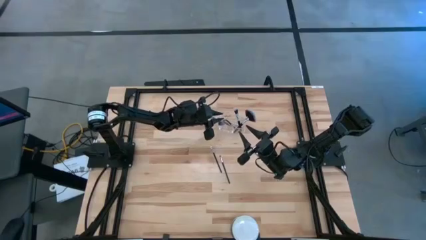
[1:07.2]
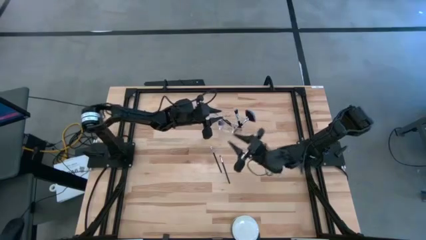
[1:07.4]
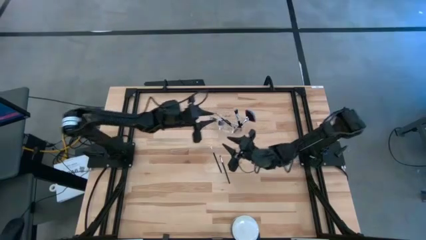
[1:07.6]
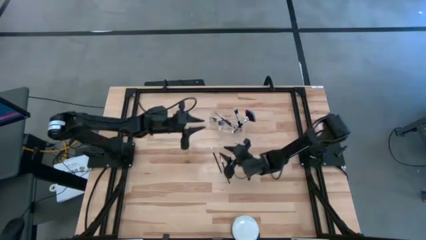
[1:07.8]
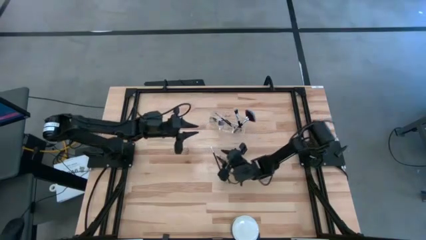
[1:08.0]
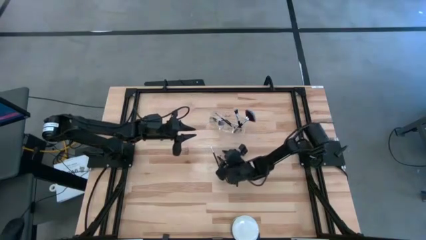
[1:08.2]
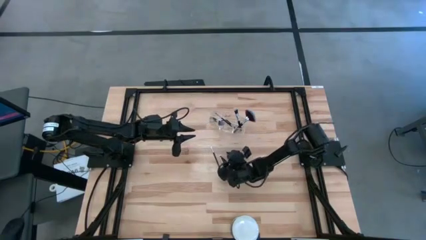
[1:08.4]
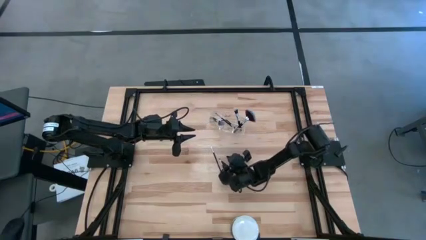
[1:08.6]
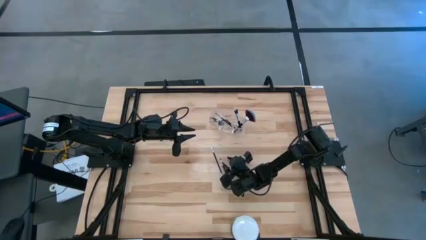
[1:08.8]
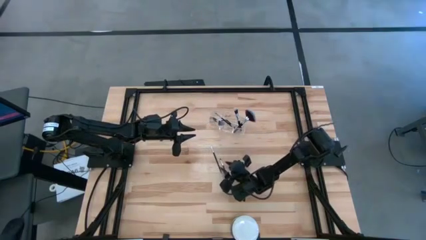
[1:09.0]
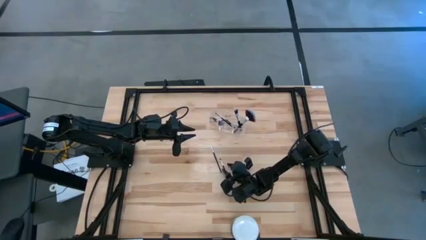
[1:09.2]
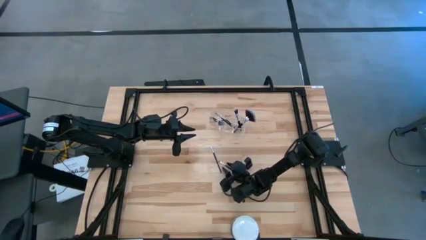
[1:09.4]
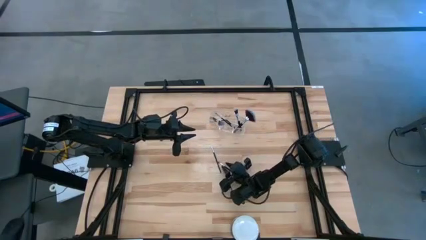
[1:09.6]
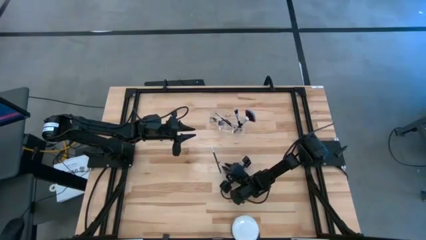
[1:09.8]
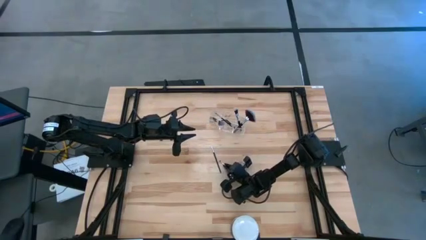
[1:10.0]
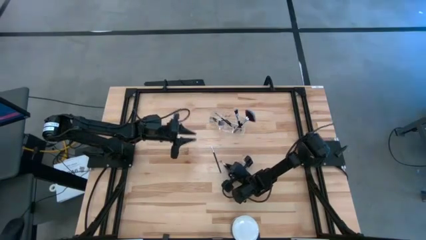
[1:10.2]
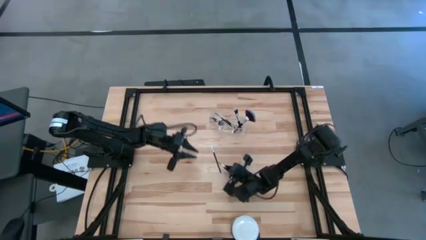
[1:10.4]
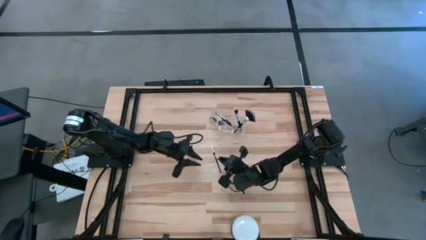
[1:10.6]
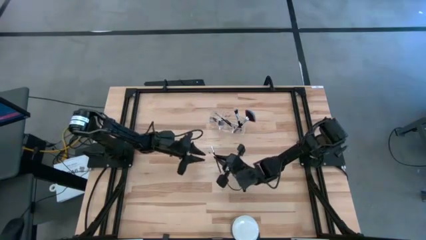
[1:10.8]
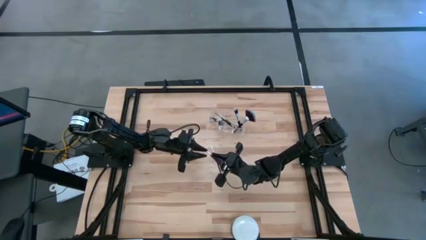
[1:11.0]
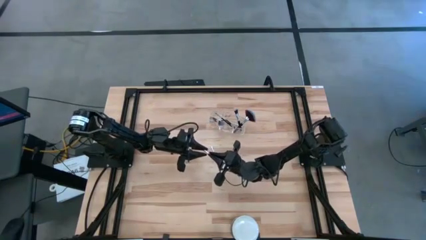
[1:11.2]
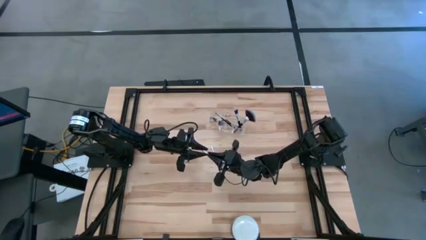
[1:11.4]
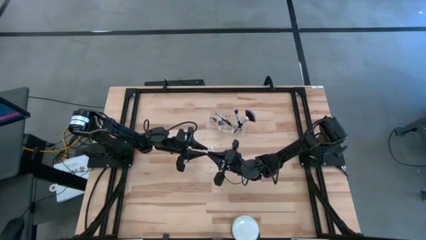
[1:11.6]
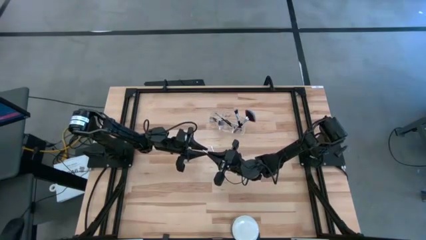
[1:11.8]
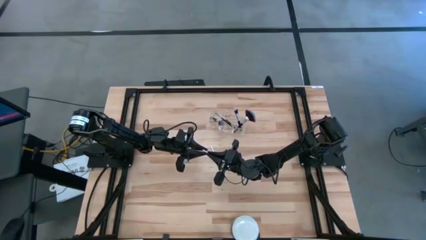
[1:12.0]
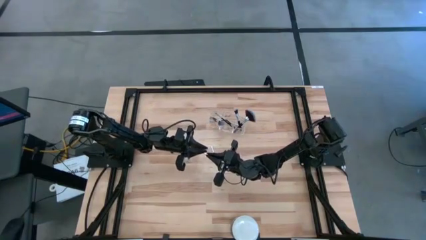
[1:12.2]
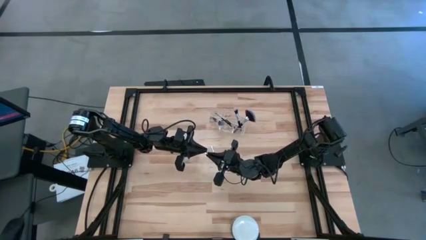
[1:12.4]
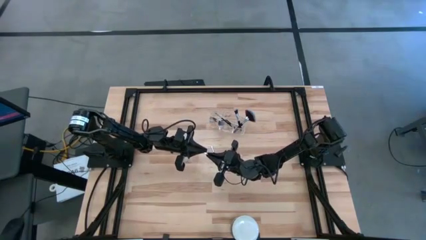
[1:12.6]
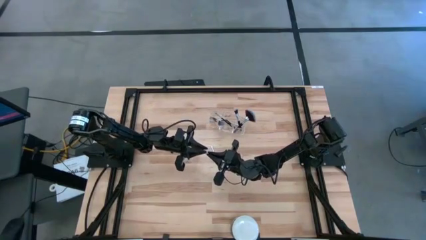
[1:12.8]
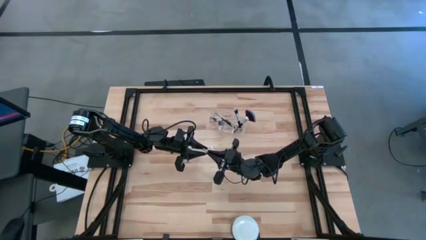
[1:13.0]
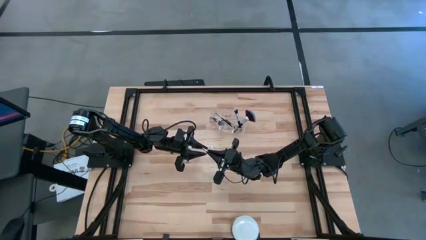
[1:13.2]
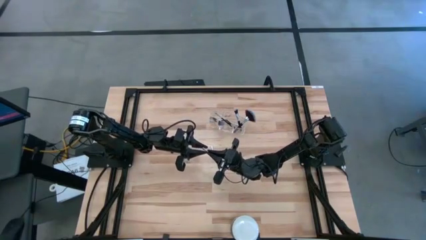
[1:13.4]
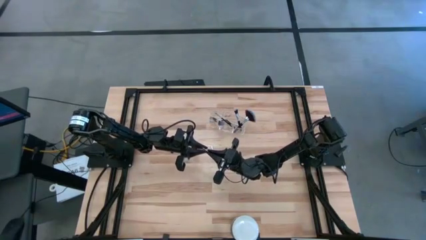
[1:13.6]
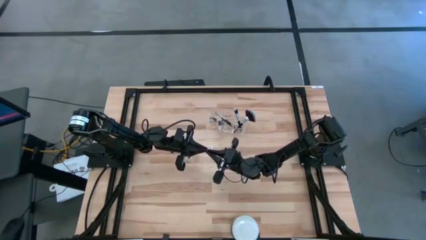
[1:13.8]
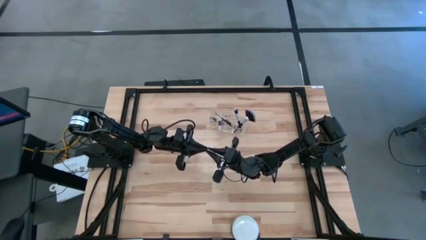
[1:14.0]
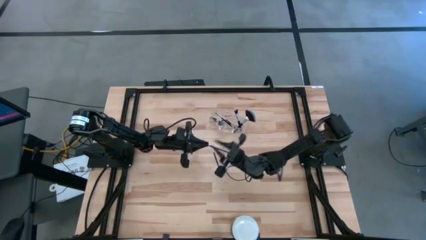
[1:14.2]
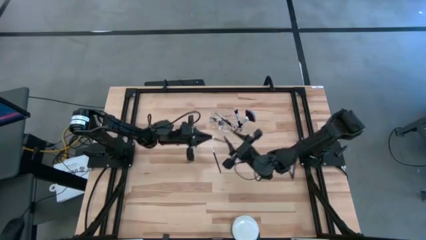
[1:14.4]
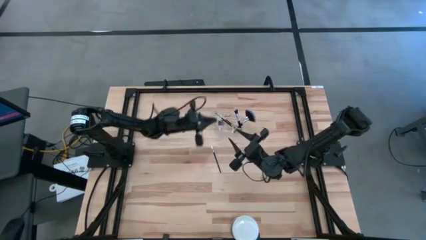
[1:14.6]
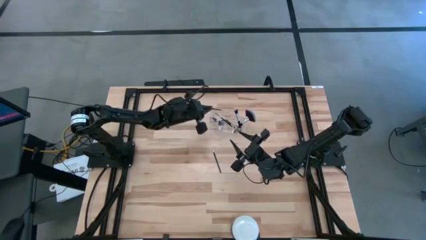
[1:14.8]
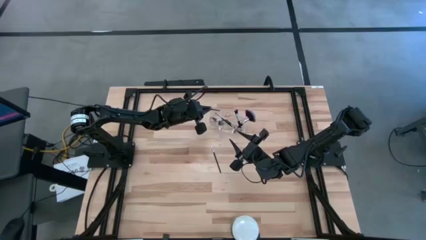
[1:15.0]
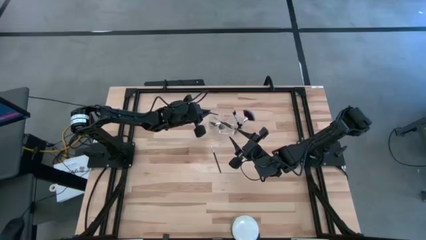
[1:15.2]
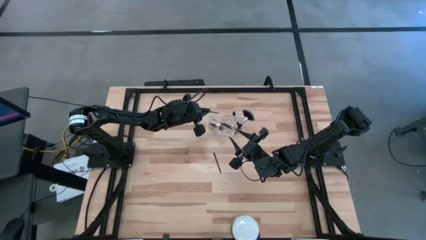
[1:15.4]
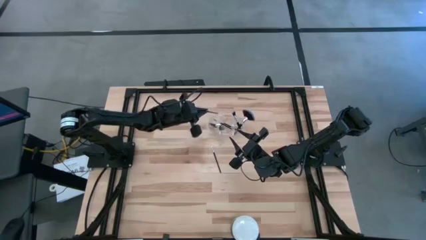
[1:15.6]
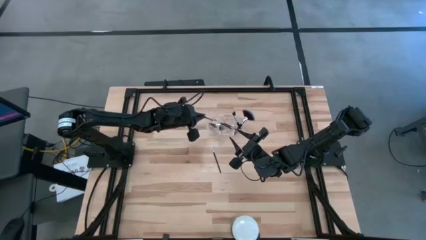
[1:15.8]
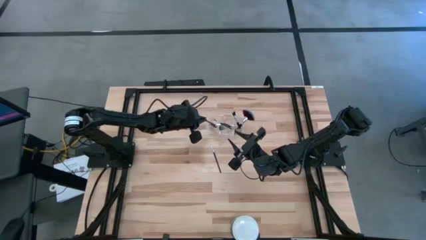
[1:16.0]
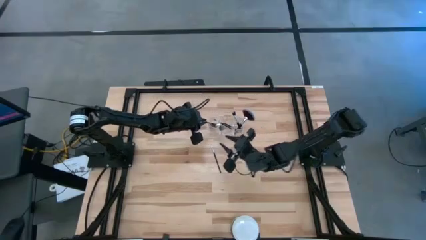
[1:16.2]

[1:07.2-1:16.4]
Task: Put items in baskets/containers
Put the black eyeshadow brush into the transparent organizer

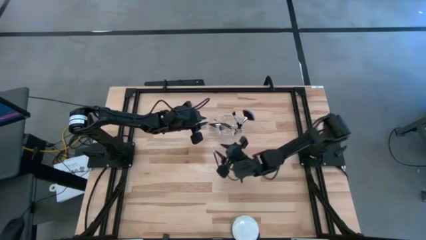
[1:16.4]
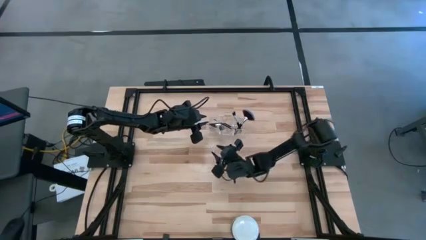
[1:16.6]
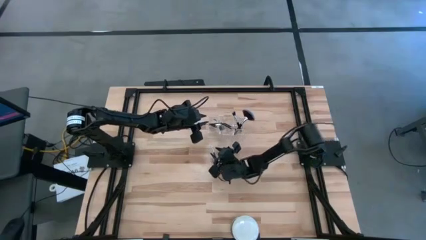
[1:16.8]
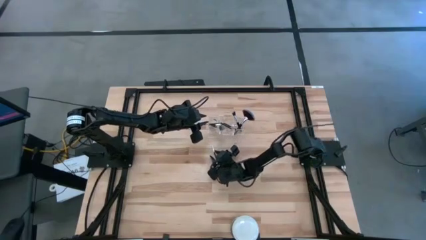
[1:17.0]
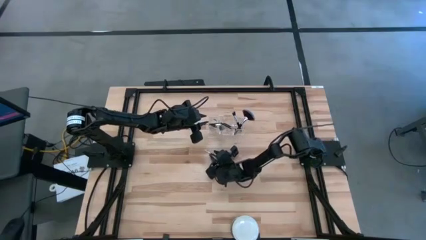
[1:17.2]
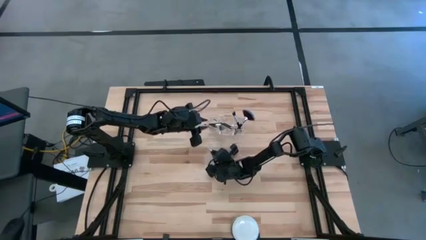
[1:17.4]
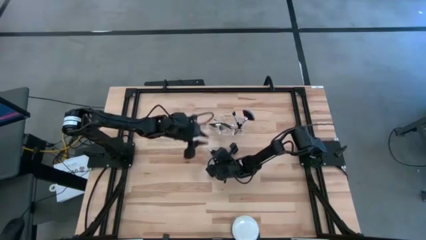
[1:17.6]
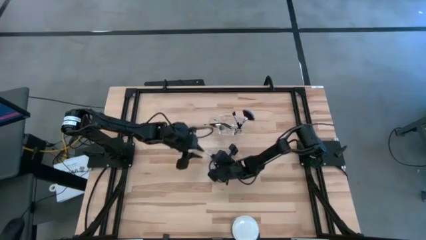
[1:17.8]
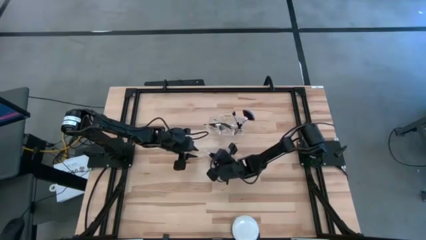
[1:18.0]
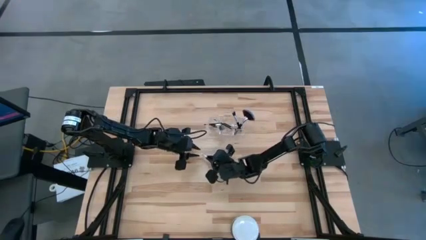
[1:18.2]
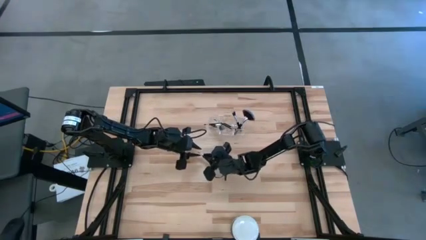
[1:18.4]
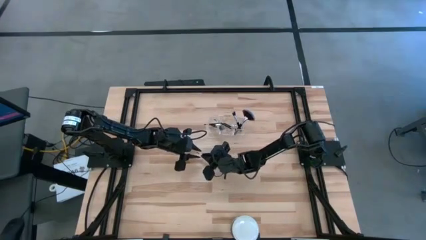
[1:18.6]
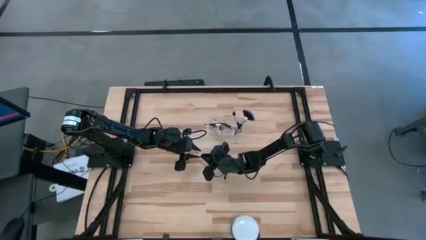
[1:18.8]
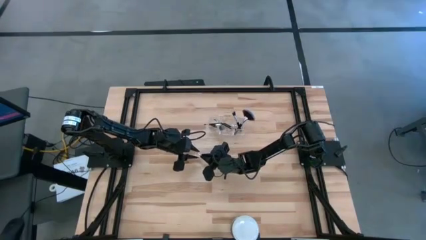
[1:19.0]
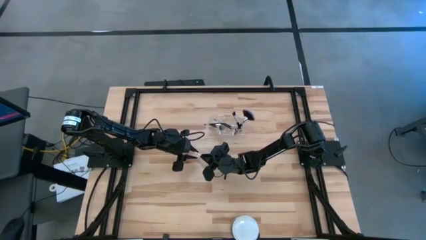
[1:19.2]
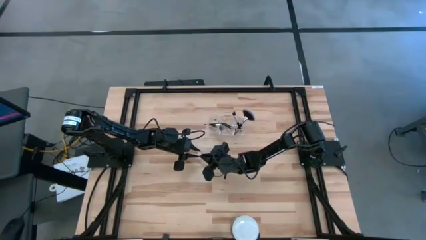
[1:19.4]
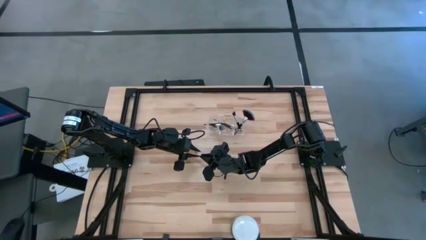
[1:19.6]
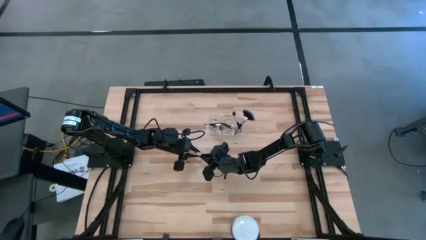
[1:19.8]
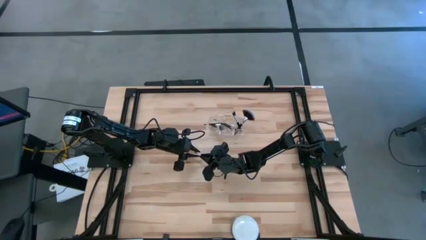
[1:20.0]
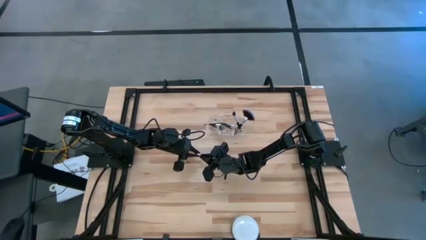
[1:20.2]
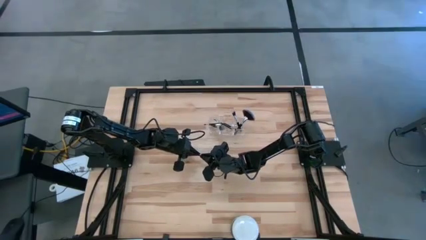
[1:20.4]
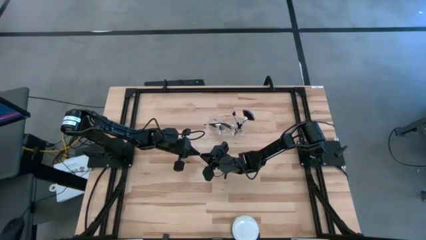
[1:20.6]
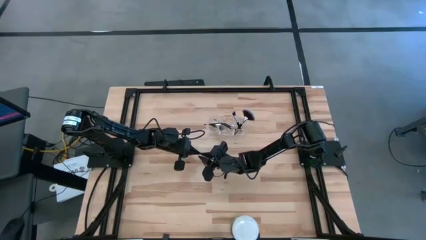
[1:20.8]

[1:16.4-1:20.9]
Put the black eyeshadow brush into the transparent organizer

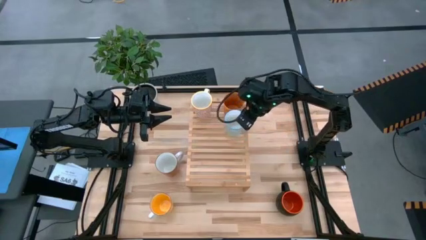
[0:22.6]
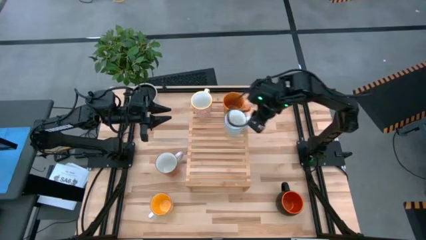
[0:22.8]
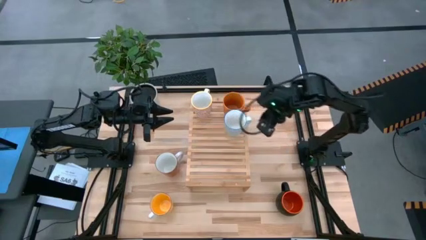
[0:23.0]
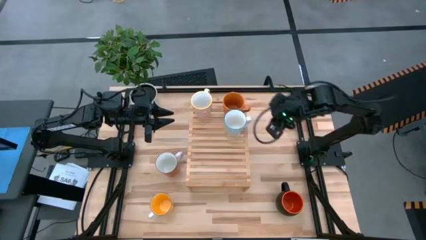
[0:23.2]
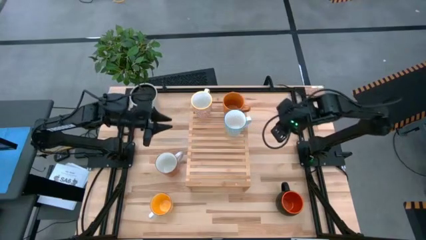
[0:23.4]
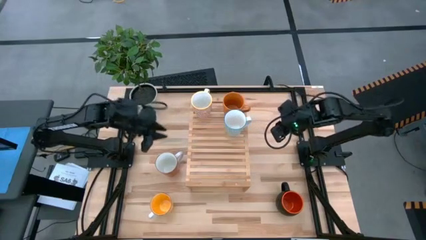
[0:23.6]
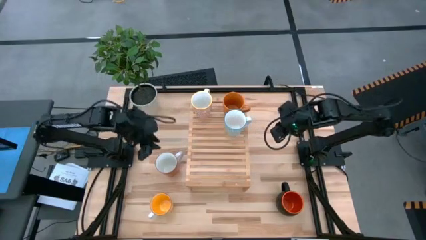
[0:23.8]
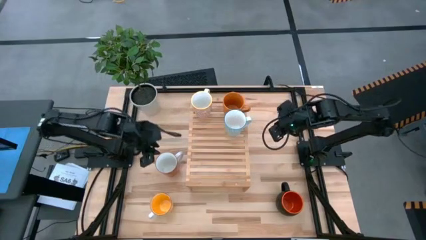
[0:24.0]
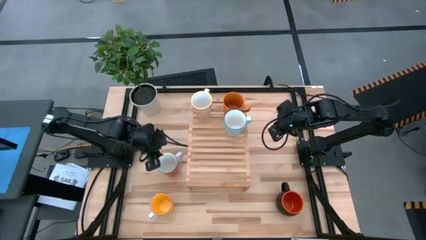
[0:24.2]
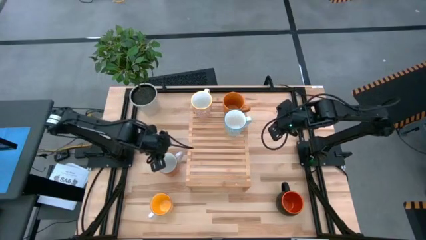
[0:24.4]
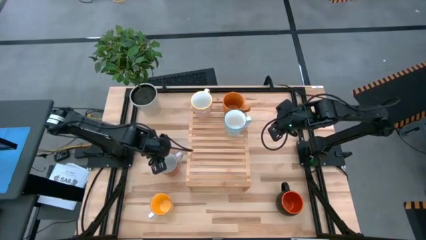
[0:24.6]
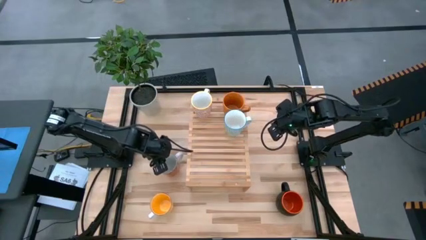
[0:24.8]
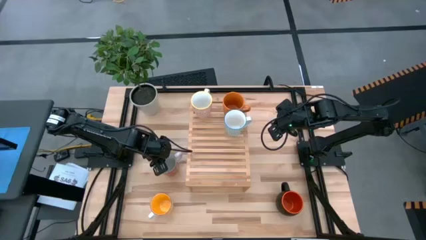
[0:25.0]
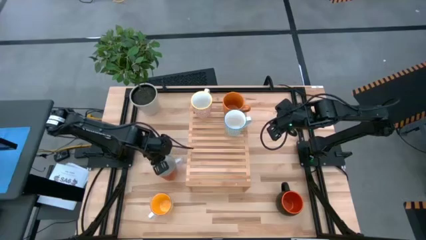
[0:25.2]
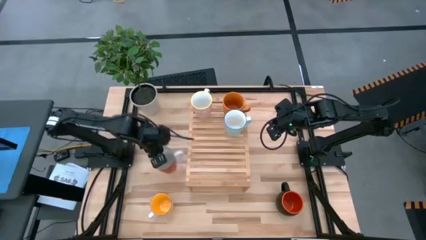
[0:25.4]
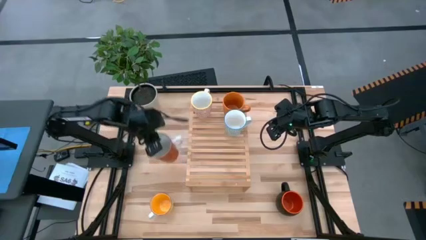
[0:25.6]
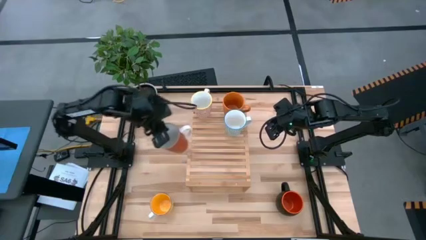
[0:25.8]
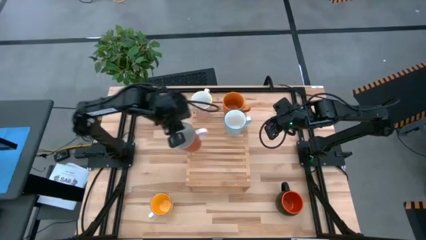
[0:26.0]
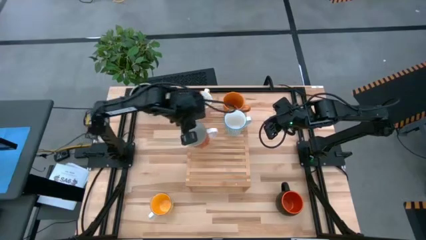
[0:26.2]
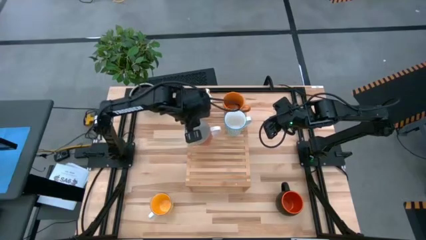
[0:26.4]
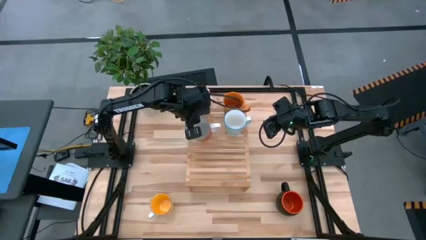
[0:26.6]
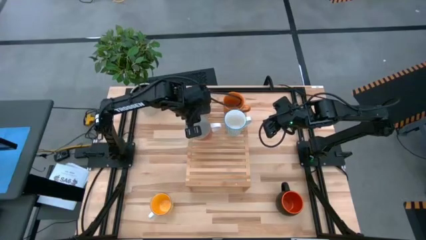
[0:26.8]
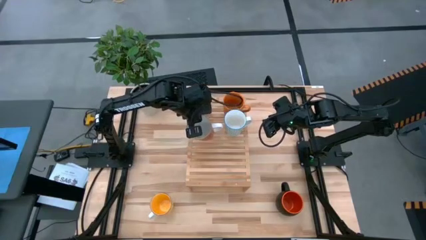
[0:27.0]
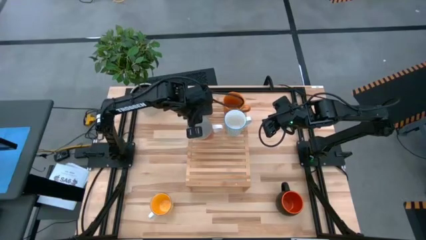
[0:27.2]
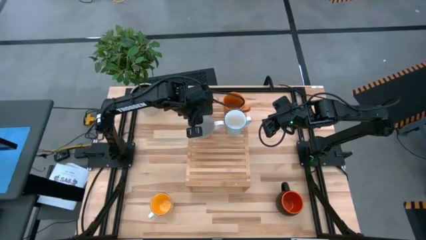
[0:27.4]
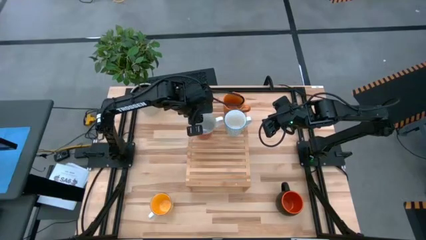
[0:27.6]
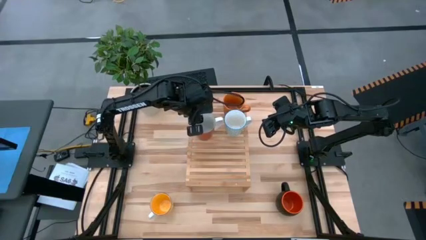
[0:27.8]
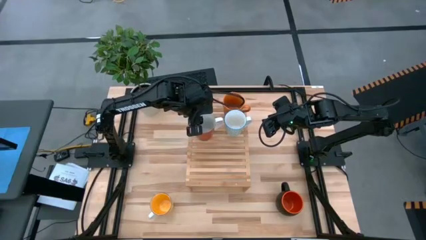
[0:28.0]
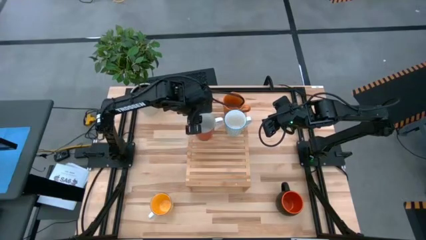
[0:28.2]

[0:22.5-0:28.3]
Task: Place coffee mugs
Put the red cup on the shelf aligned with the other orange cup
